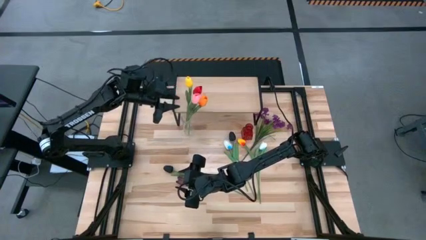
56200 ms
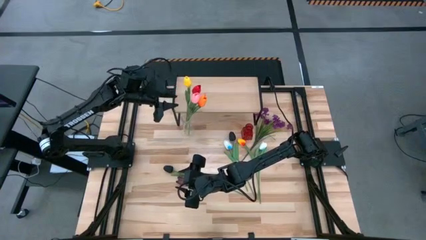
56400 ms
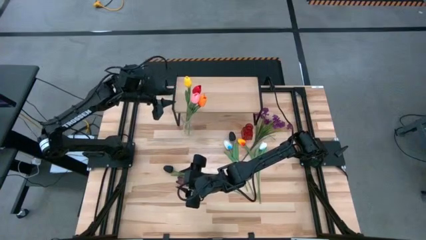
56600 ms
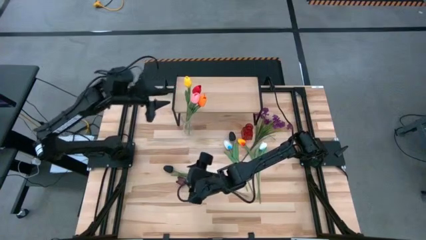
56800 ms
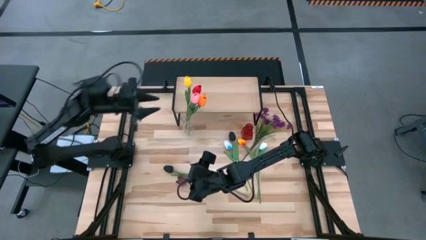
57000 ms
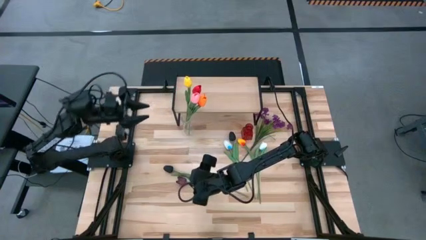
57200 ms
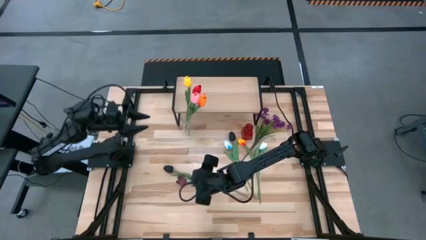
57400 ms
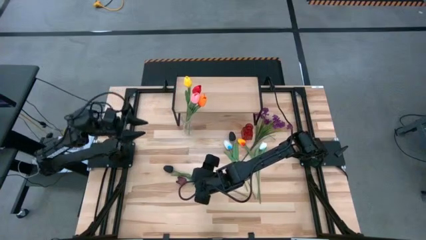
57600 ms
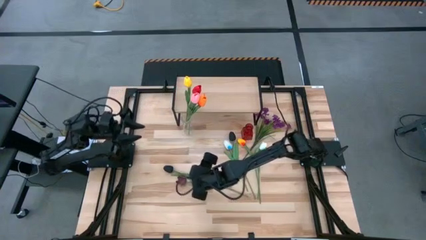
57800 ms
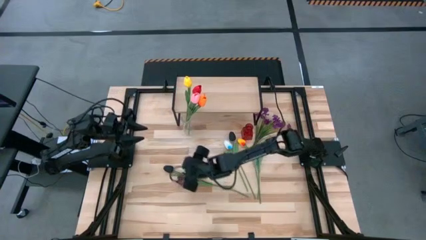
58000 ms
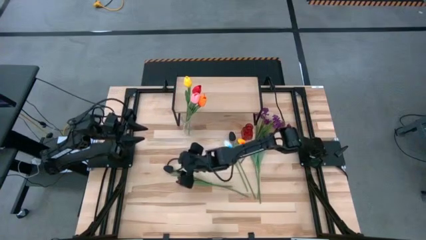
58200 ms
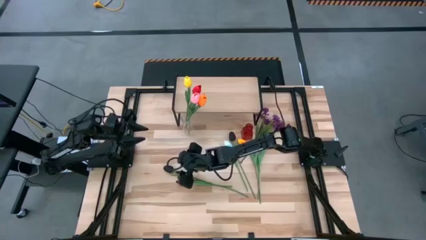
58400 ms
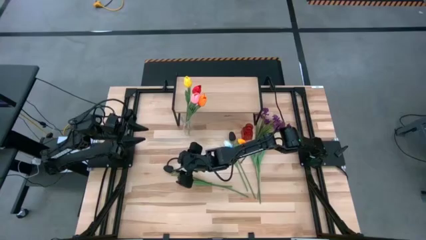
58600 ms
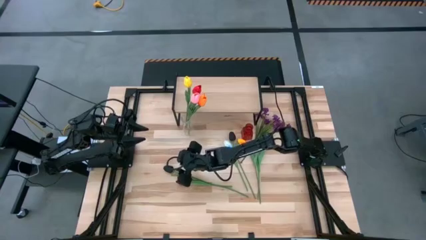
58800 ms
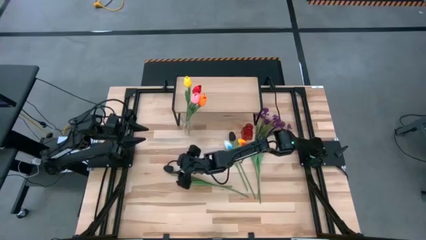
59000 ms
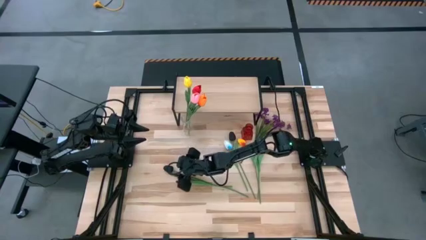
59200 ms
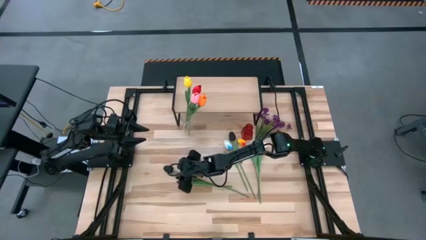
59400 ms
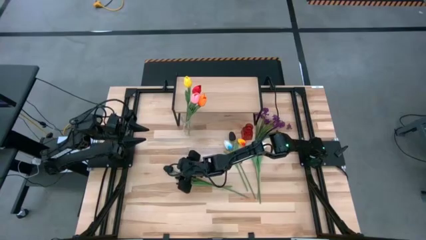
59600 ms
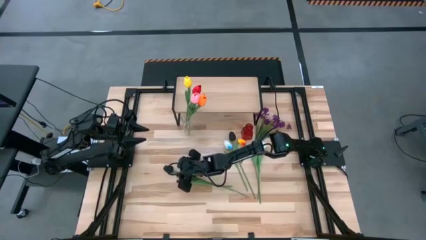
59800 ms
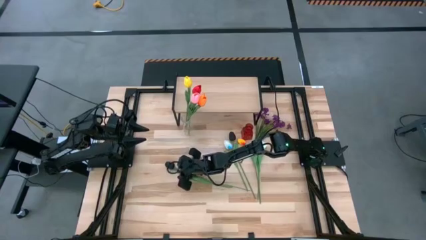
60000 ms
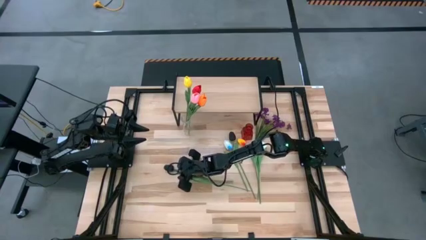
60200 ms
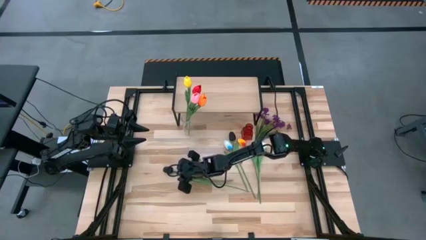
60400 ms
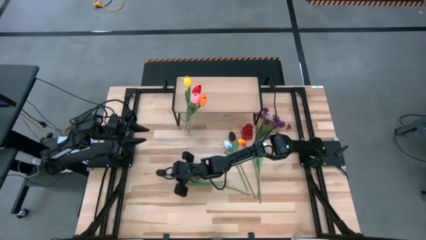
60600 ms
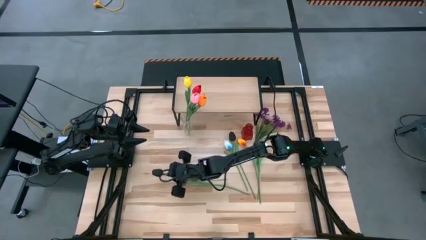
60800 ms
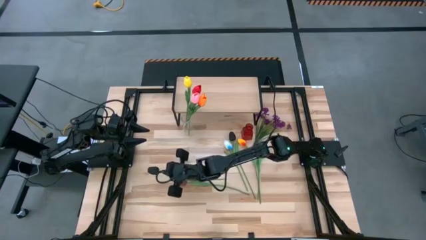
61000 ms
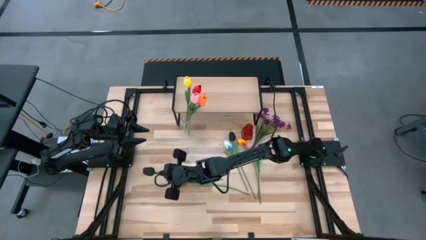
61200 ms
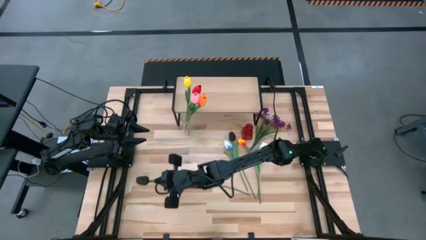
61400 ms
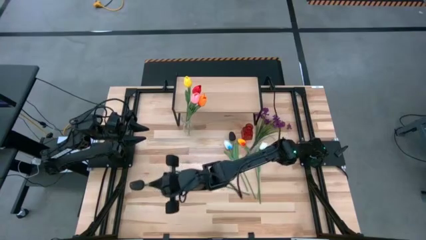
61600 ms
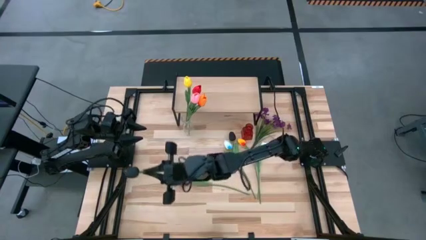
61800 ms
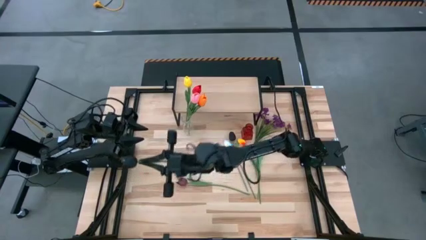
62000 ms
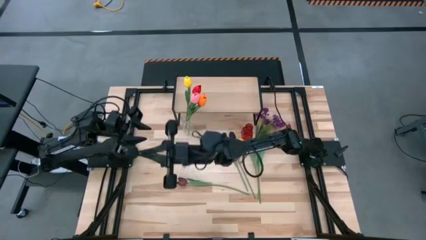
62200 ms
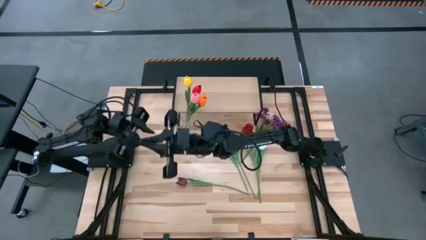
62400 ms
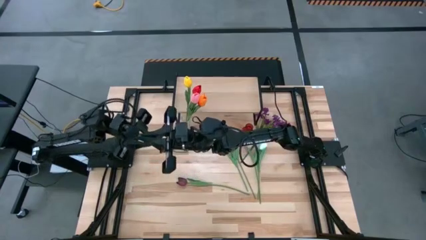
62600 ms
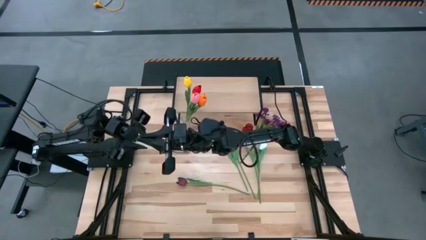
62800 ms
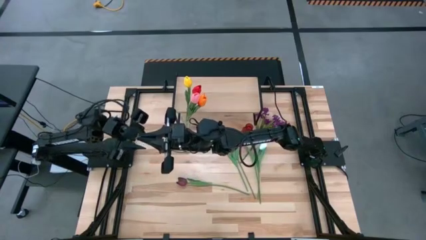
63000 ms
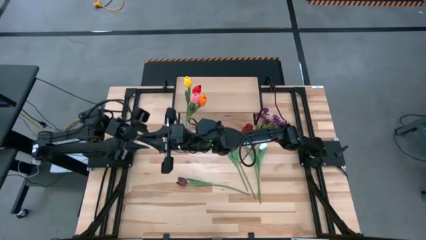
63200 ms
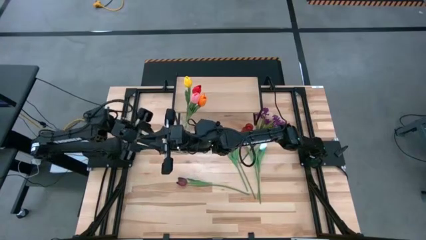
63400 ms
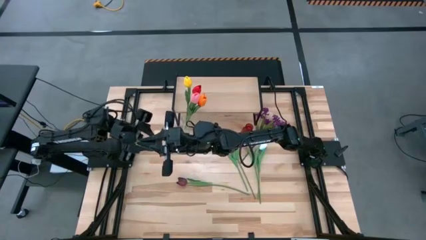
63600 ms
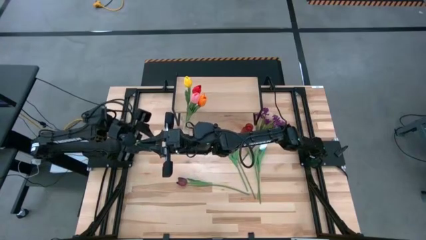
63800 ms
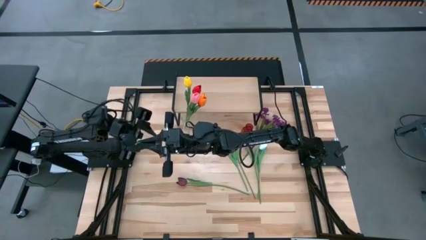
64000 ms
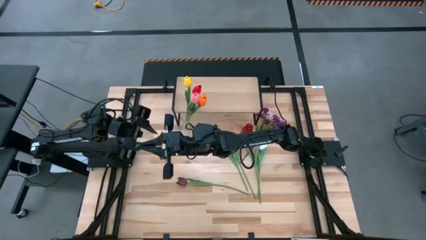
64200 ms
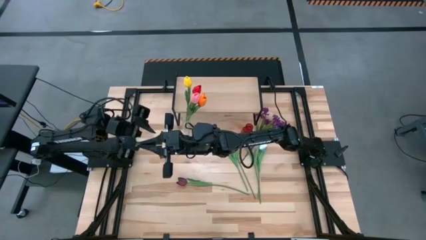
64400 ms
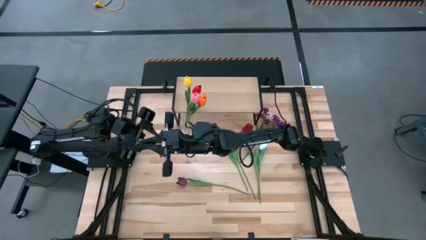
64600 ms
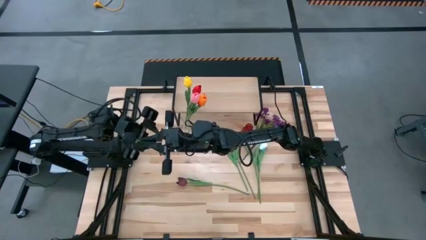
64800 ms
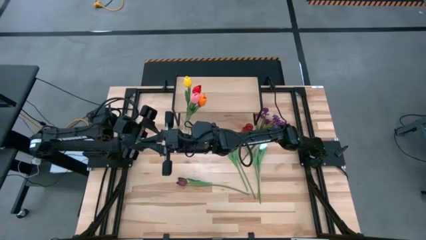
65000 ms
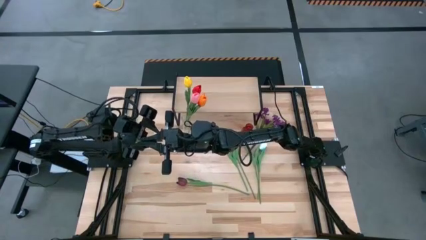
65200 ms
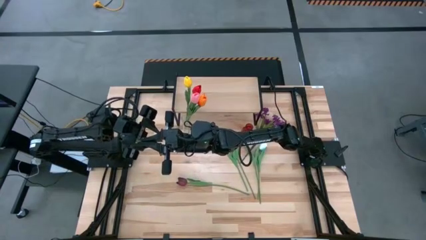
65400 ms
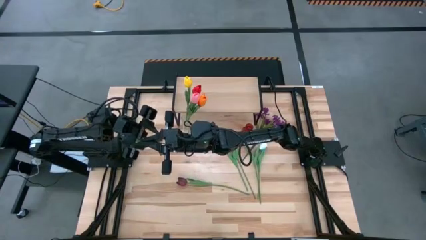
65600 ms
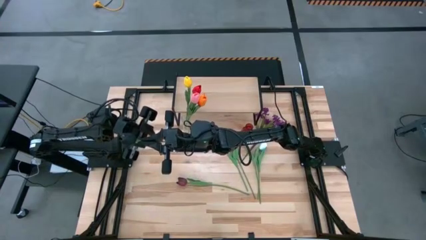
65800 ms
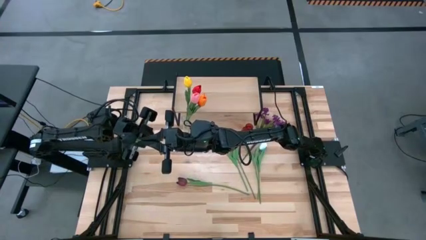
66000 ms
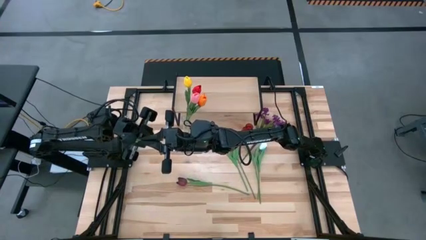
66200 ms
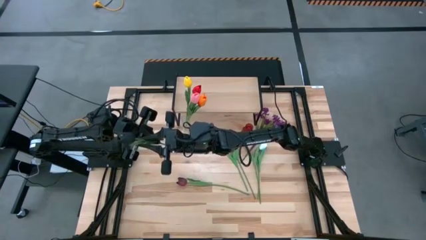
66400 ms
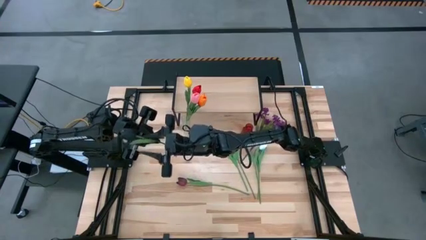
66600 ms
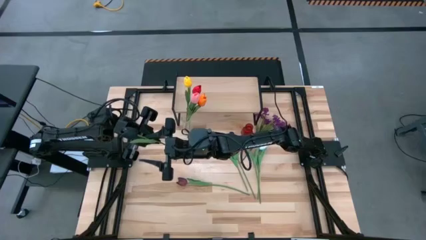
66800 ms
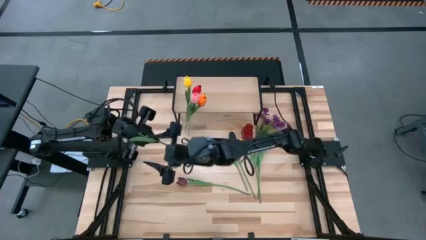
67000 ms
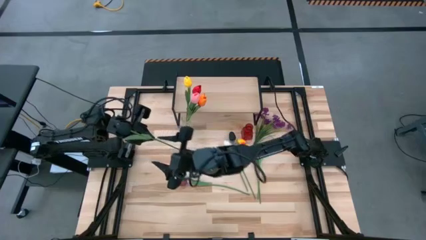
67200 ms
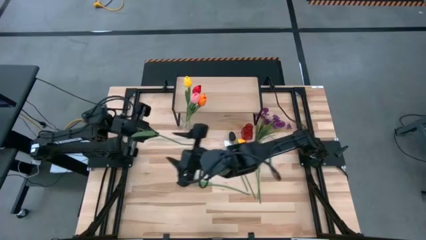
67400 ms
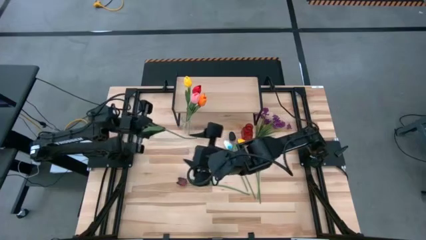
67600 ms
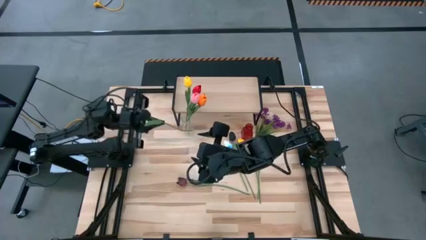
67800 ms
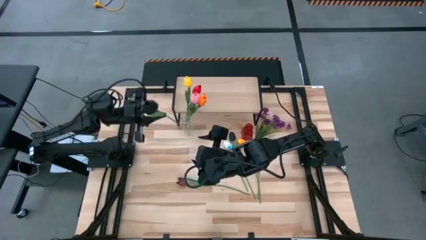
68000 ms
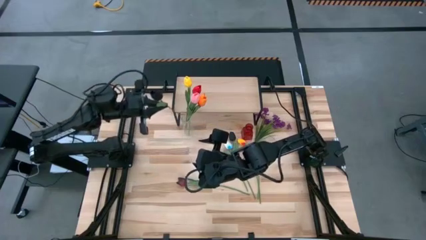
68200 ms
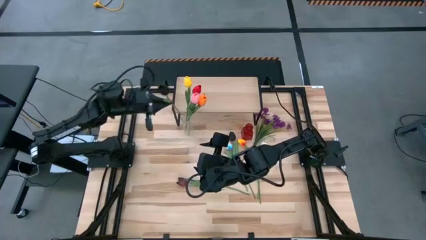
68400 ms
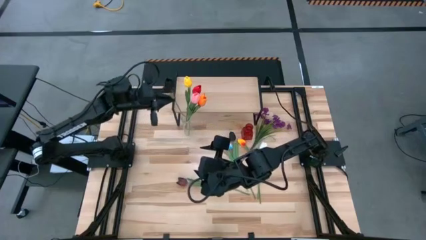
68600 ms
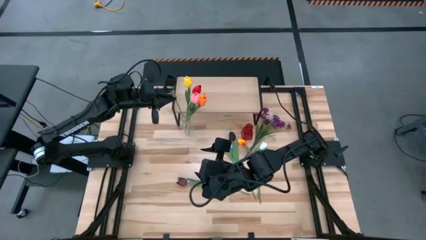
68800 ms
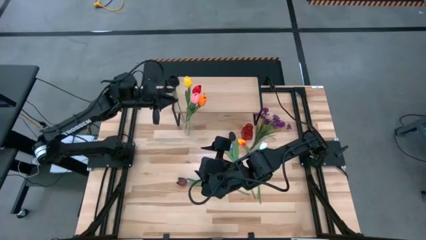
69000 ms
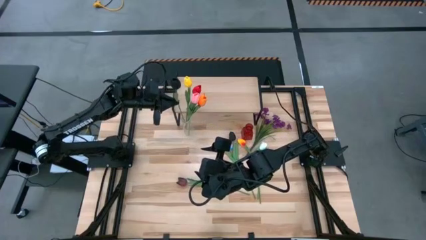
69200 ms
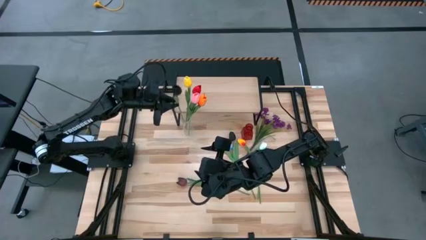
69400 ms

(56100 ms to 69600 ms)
Task: Pick and place flowers into a vace then onto a shelf
Put the left black flower into the transparent vase

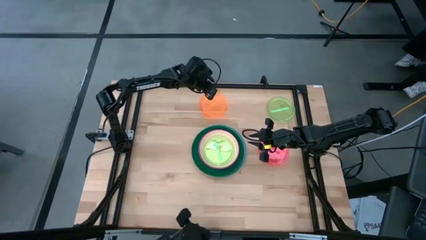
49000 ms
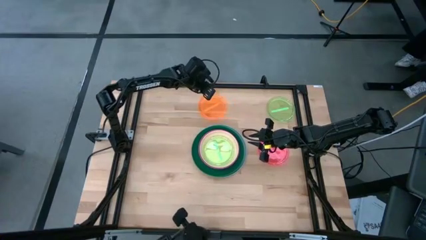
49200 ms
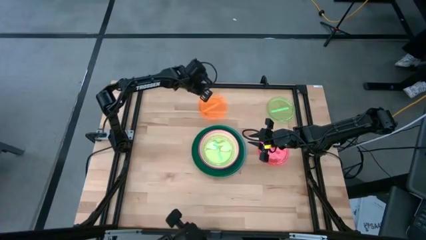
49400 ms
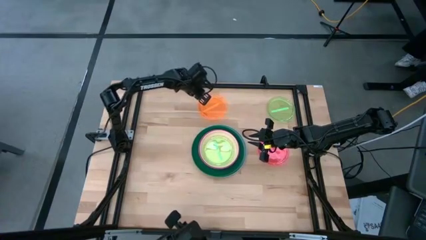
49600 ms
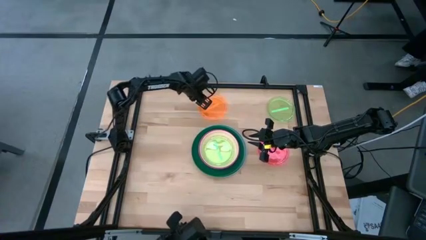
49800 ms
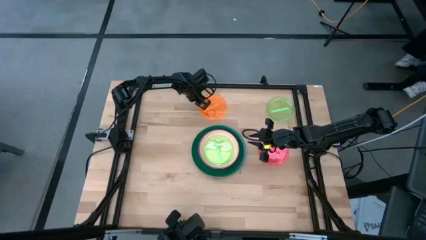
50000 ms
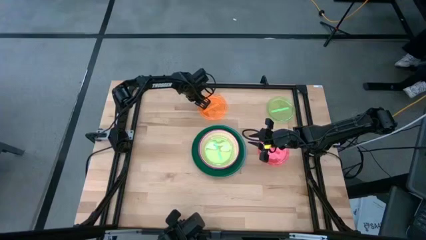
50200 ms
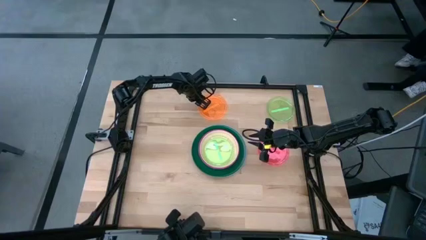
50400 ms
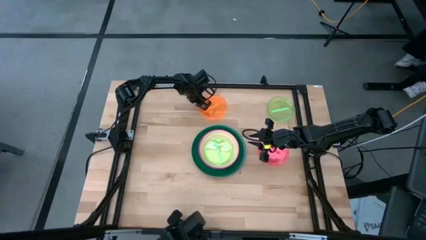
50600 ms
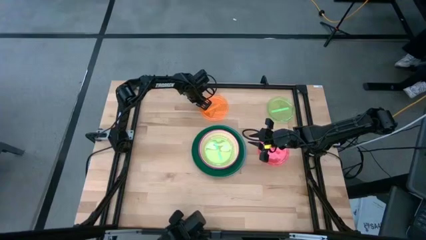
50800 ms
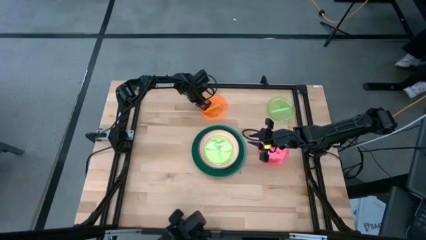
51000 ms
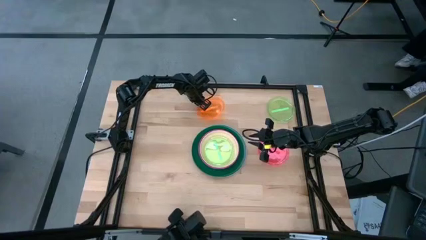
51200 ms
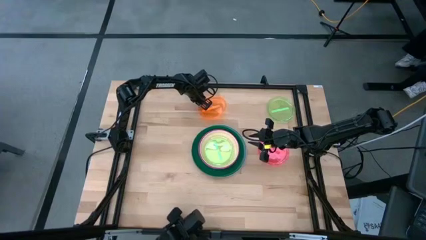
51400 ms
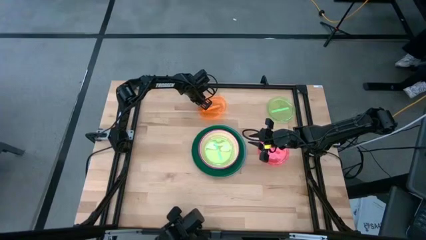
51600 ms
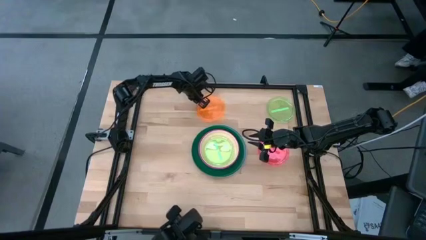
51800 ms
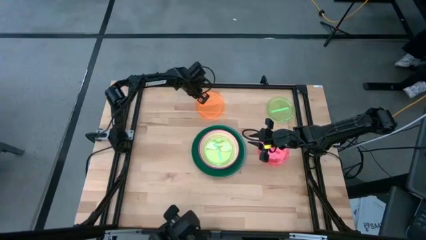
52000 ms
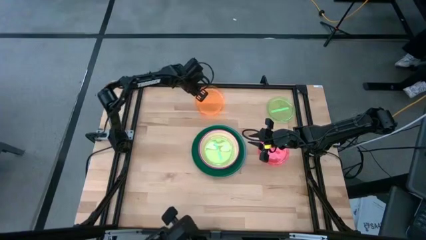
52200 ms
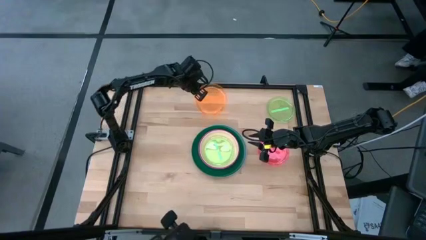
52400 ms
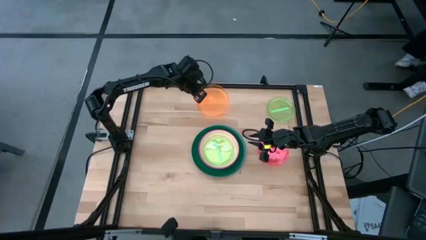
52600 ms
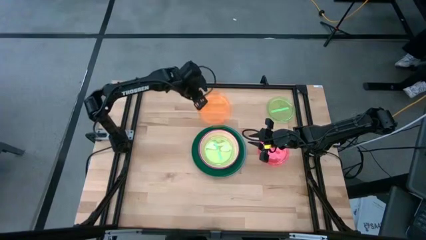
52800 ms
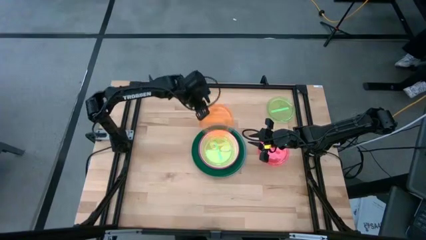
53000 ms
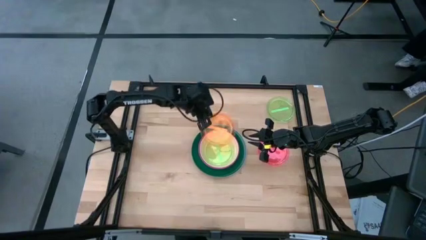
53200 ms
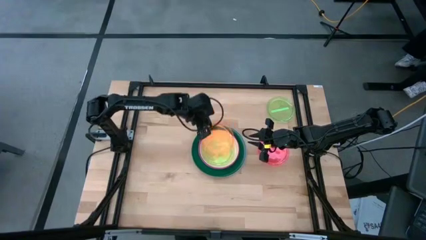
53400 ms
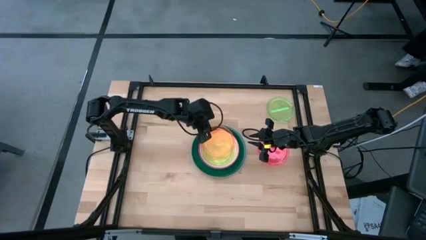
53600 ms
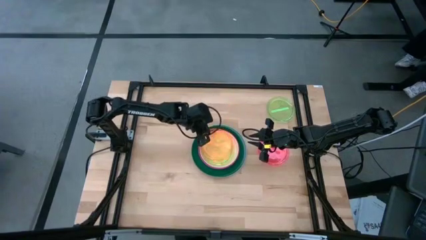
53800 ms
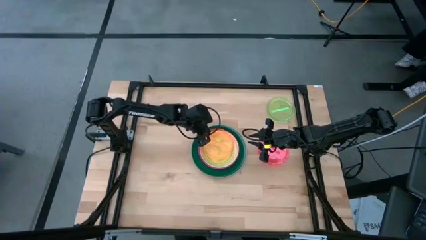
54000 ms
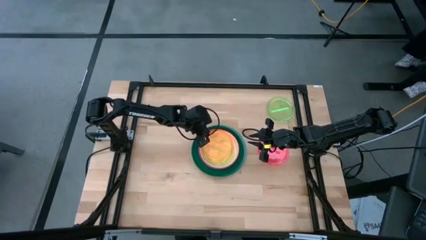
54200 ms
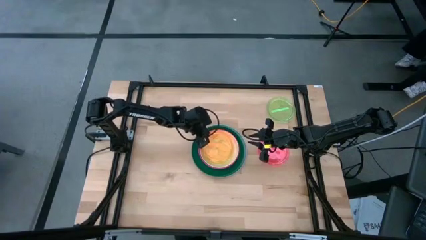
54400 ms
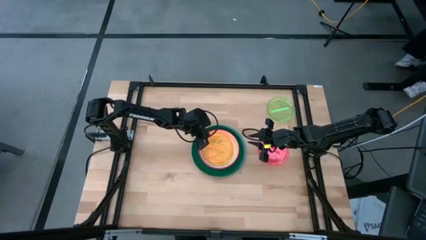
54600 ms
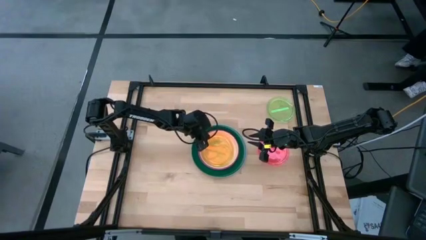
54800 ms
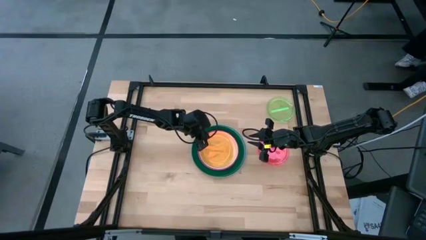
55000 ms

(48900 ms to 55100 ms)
Task: Stack plastic plates
Stack the orange plate on top of the bottom light green plate
